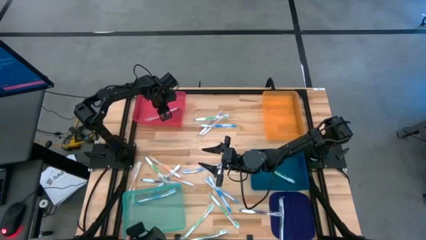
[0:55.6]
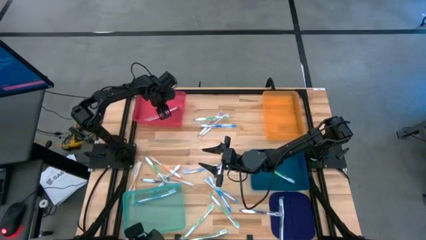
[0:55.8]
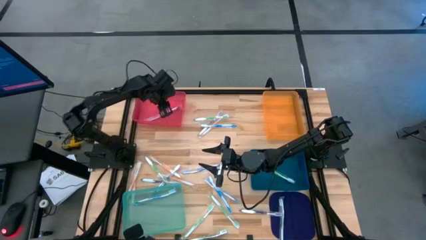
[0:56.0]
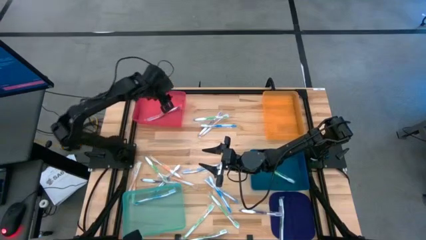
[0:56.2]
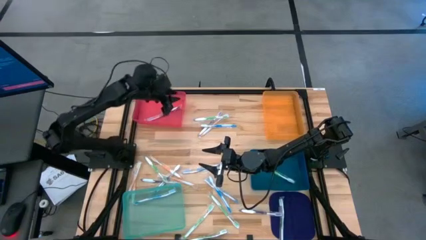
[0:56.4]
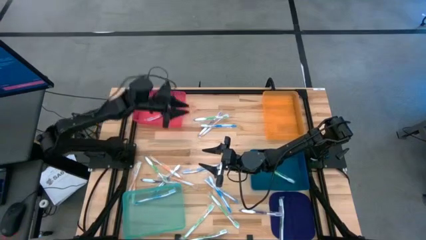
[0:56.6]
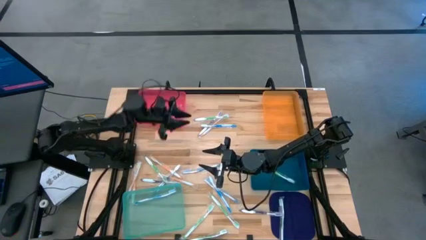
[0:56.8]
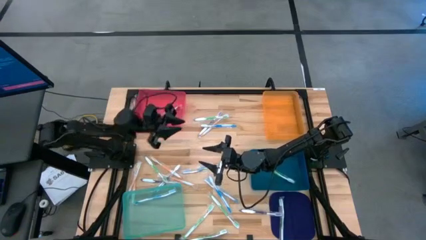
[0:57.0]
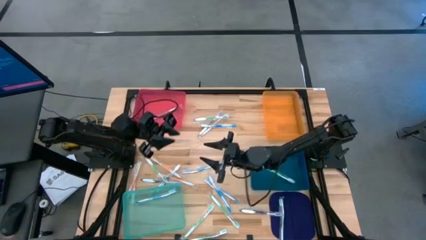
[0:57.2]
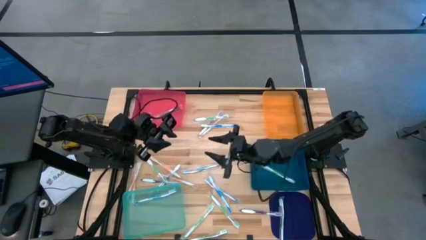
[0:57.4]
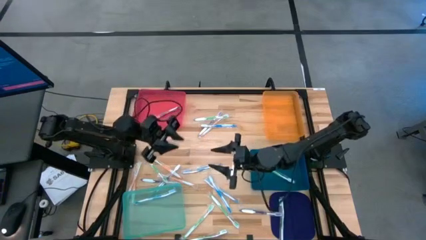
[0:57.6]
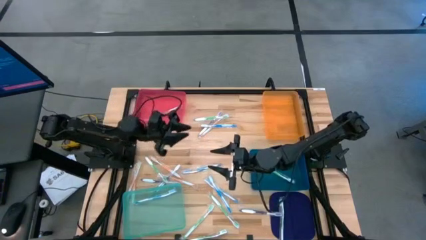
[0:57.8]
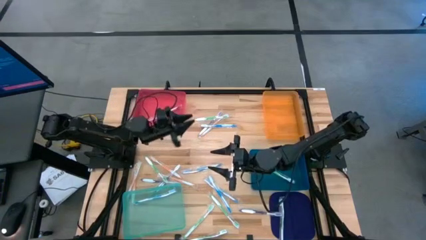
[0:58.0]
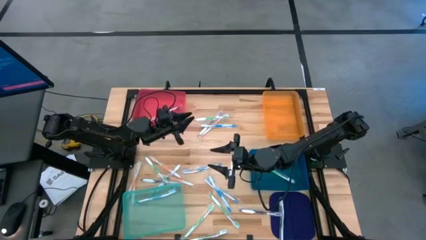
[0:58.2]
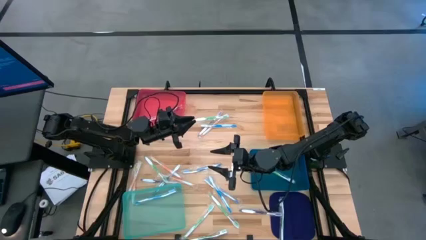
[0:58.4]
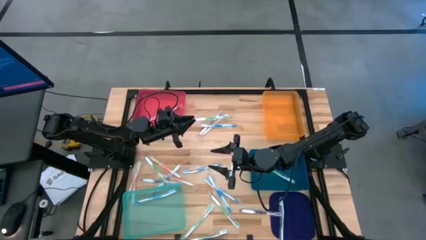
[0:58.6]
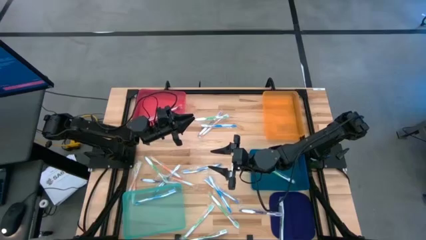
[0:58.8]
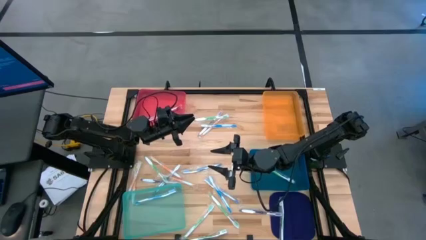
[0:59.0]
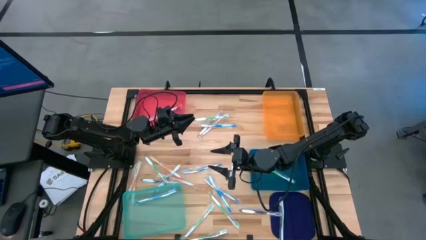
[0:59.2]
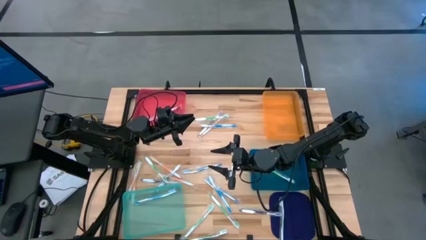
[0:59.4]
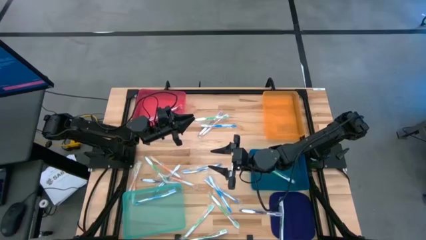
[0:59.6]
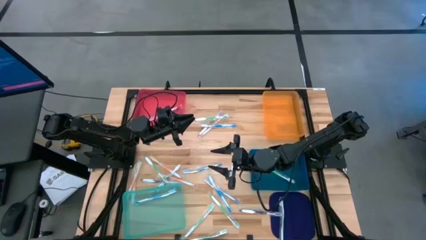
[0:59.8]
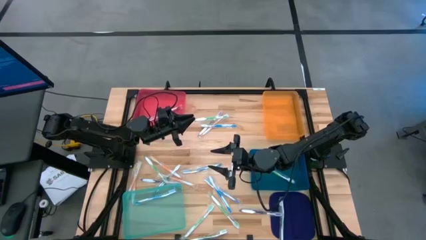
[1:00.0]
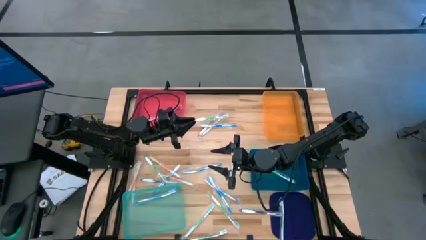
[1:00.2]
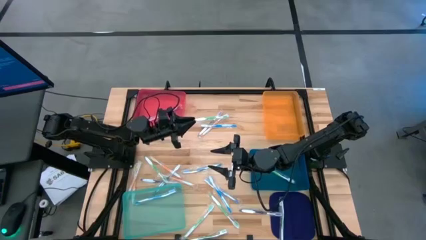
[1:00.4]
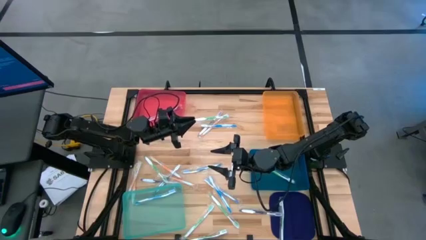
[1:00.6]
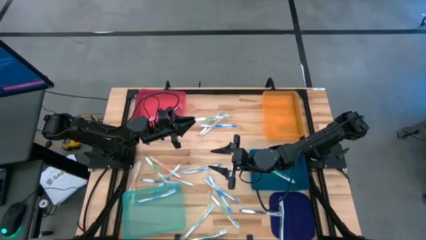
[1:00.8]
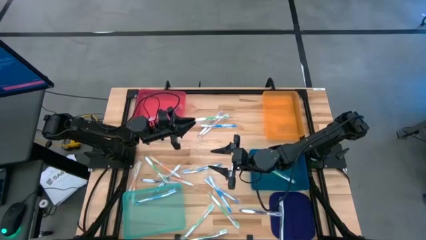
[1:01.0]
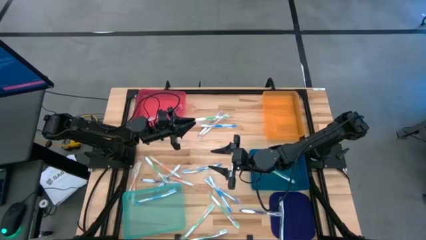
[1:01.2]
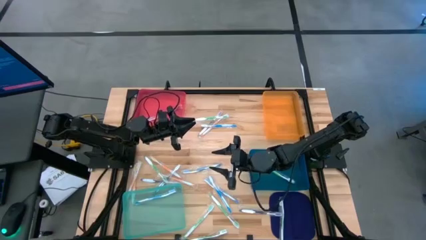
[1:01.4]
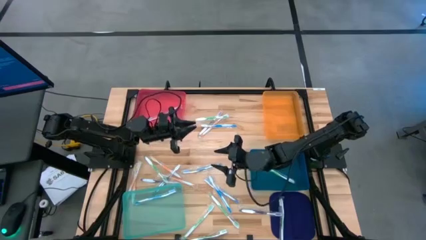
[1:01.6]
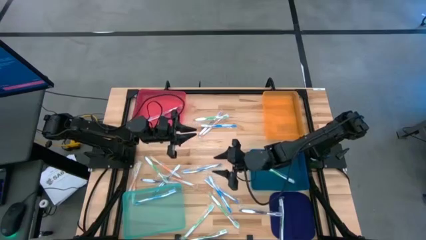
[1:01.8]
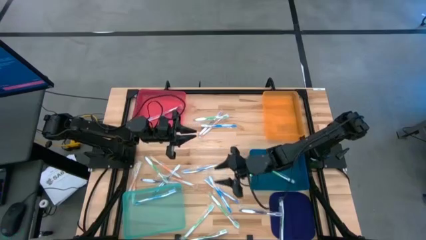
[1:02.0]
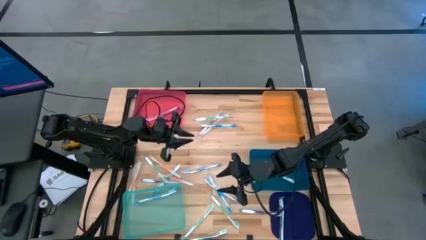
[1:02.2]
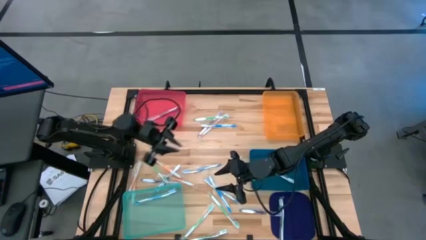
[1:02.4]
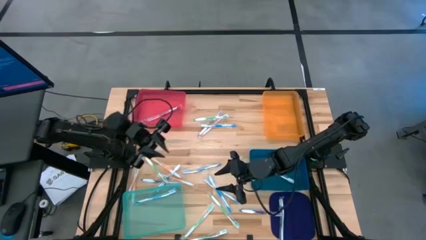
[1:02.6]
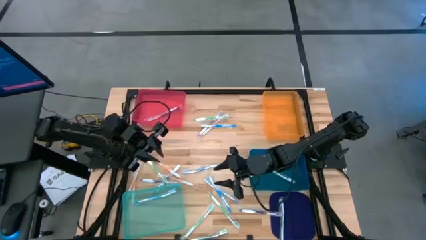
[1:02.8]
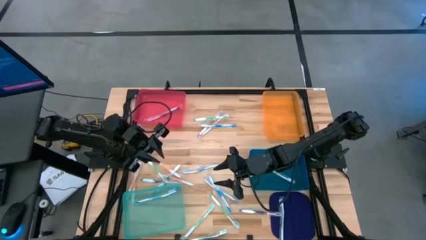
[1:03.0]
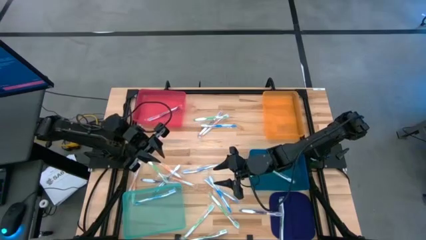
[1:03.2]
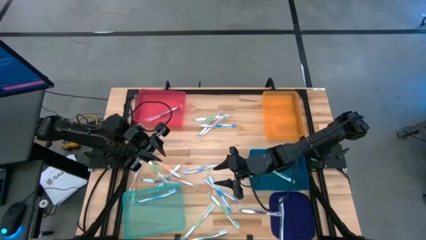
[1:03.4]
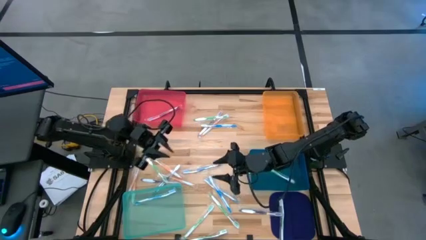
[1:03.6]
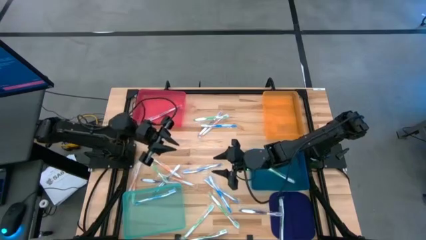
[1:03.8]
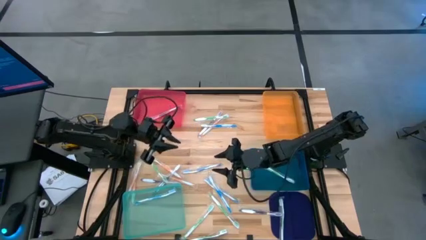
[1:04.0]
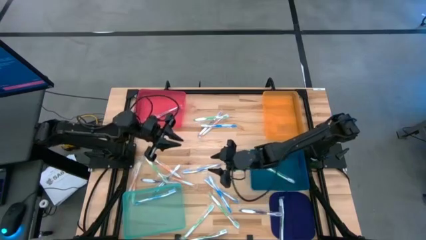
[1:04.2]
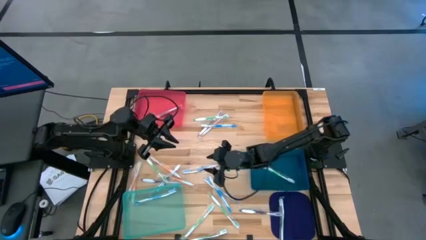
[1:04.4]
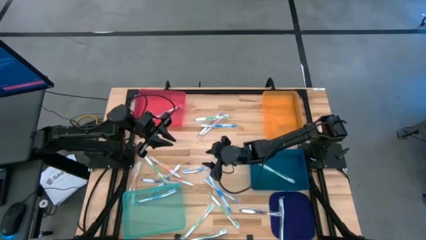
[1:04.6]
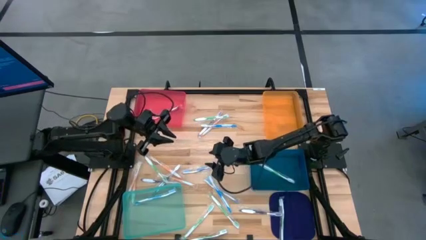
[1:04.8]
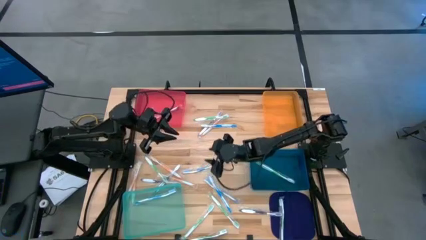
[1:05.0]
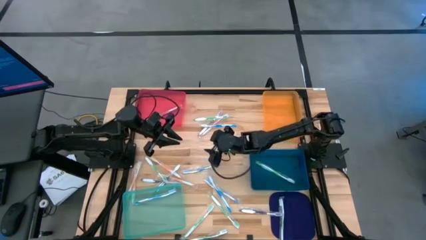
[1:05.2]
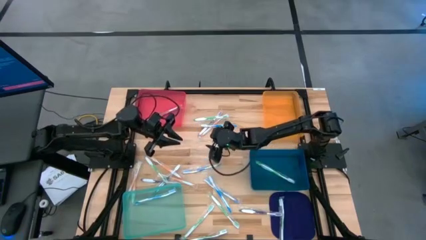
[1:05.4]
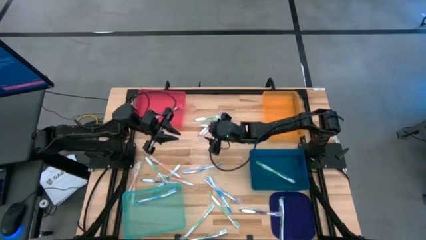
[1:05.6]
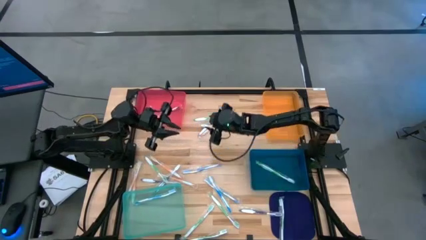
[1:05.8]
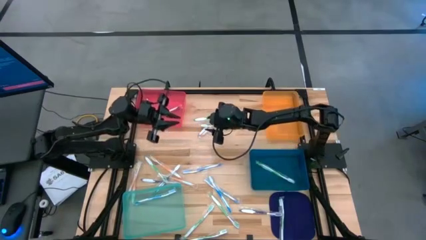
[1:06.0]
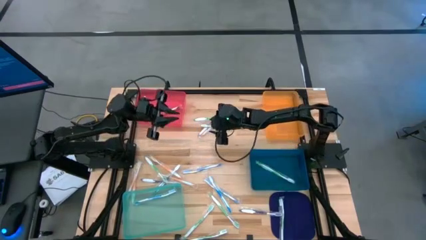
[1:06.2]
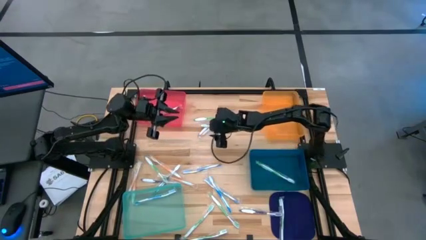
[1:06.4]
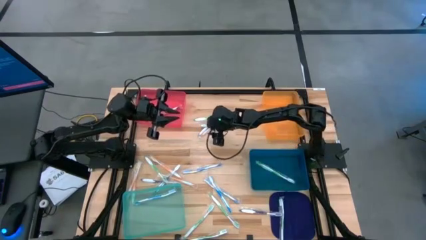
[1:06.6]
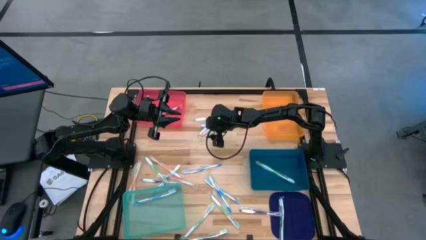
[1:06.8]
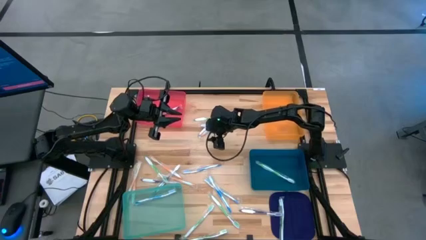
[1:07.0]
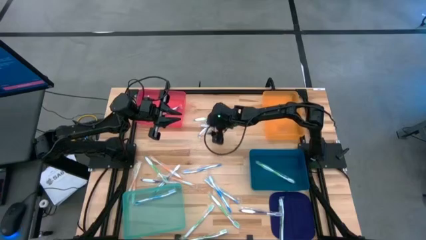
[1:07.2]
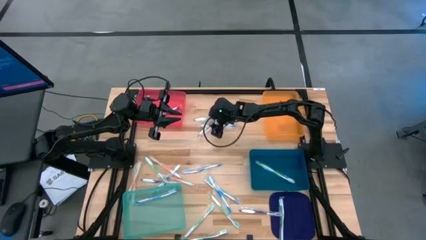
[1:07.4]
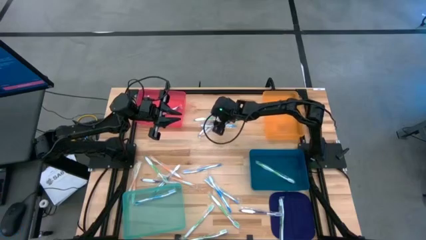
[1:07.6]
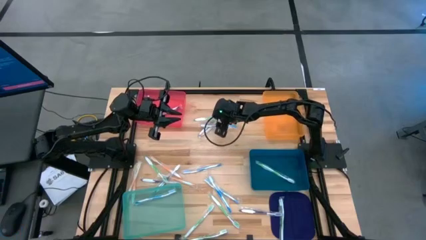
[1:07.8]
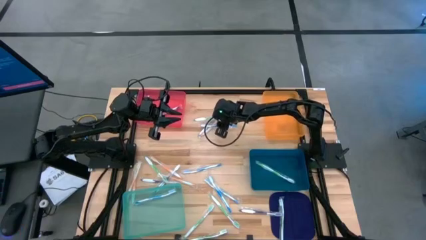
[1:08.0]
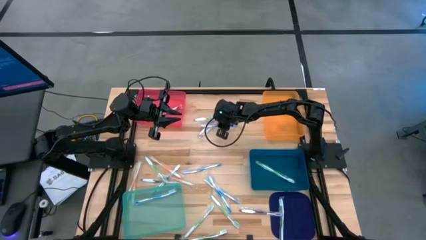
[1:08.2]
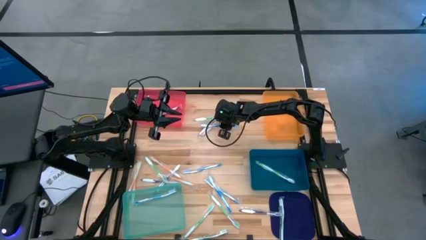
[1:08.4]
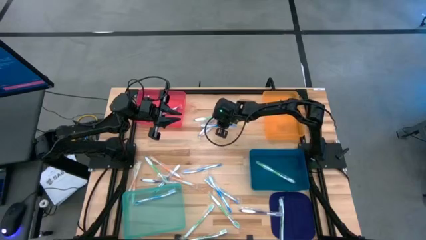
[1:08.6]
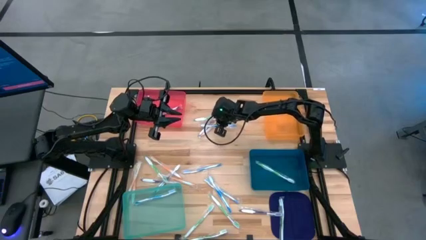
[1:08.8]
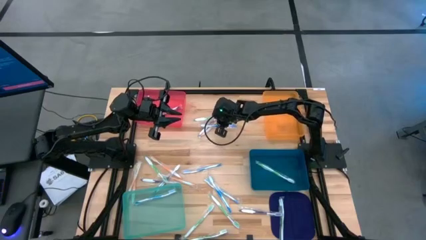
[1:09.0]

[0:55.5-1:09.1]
Task: Pick & Place Toothbrushes
Put the orange toothbrush into the orange bin
